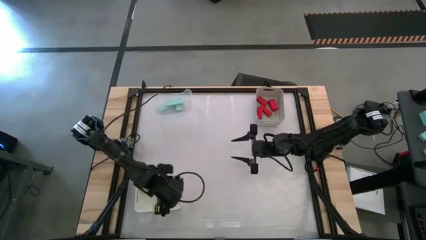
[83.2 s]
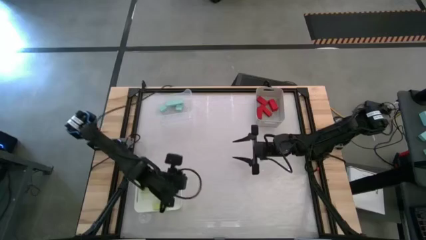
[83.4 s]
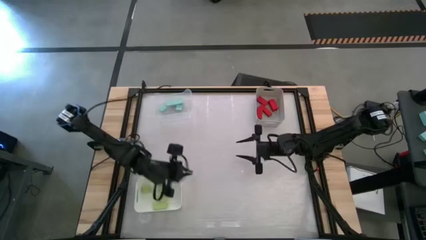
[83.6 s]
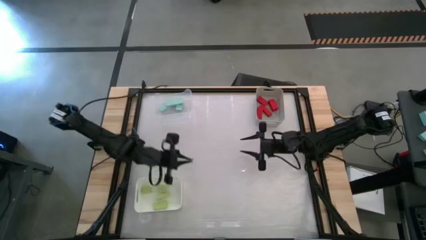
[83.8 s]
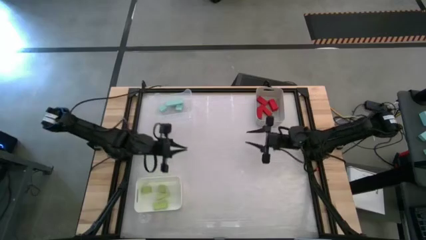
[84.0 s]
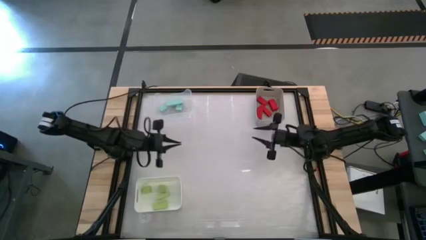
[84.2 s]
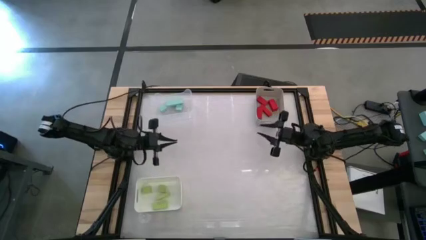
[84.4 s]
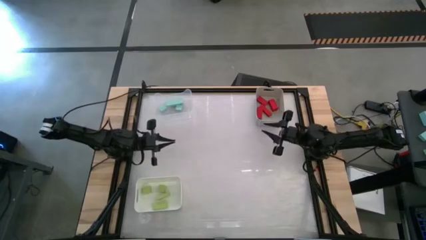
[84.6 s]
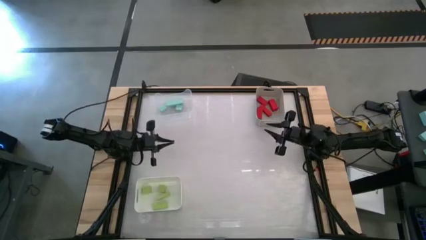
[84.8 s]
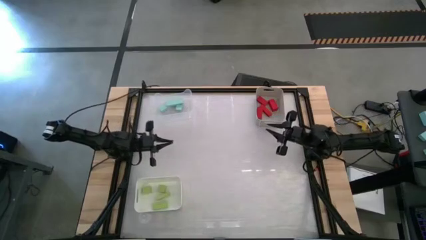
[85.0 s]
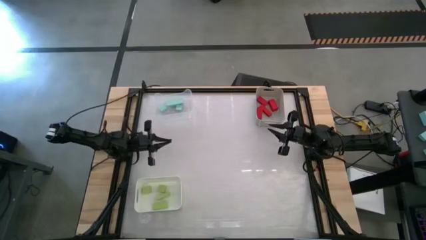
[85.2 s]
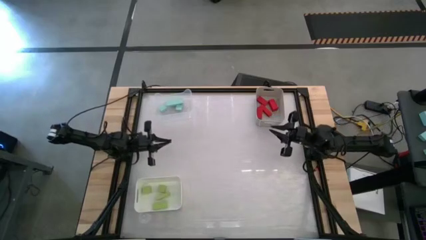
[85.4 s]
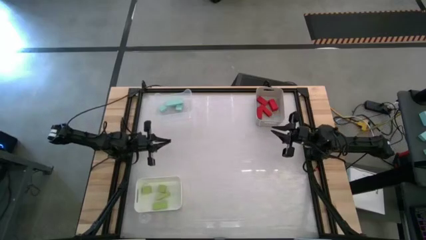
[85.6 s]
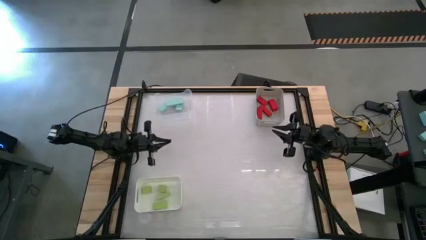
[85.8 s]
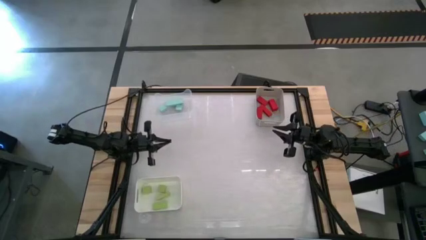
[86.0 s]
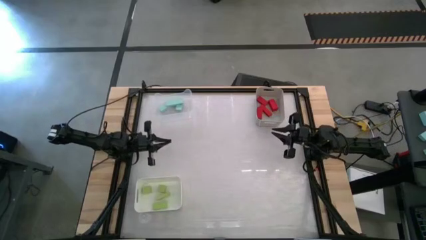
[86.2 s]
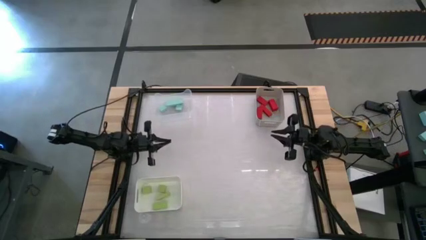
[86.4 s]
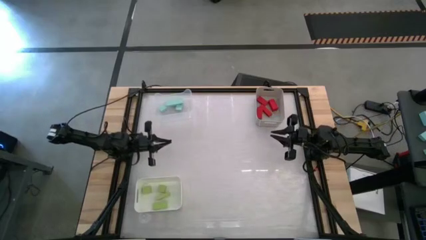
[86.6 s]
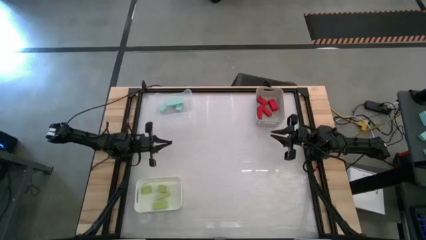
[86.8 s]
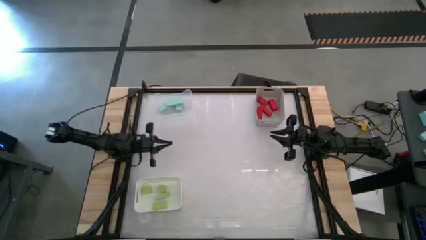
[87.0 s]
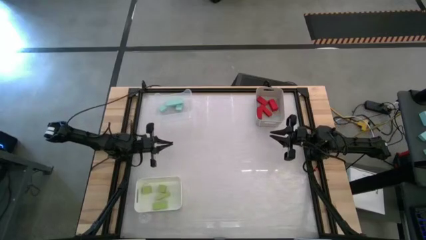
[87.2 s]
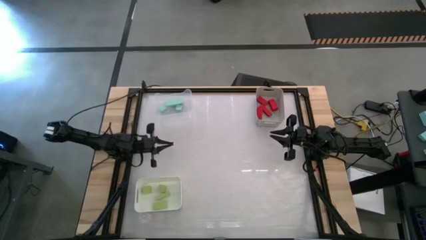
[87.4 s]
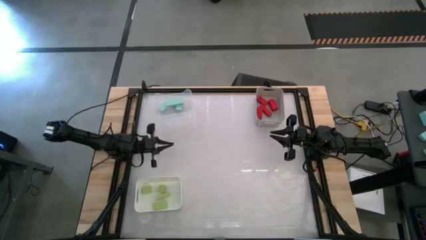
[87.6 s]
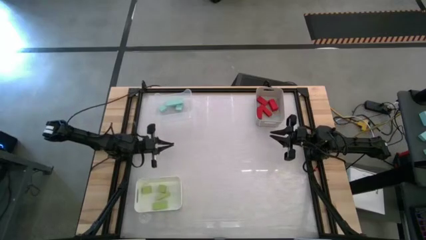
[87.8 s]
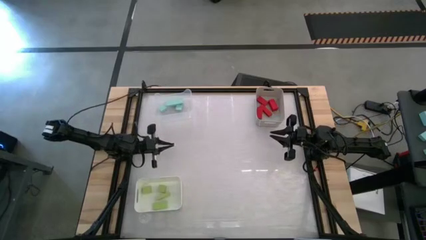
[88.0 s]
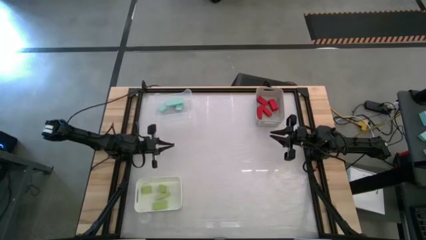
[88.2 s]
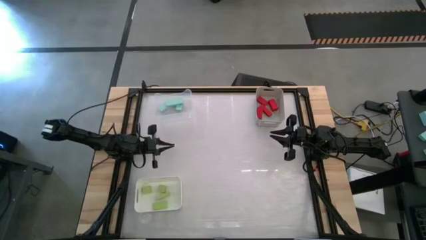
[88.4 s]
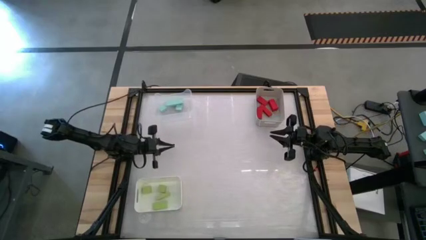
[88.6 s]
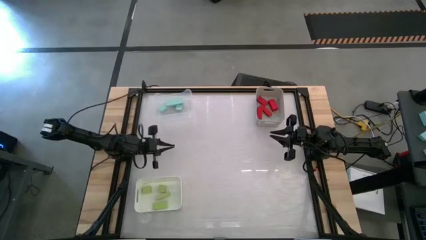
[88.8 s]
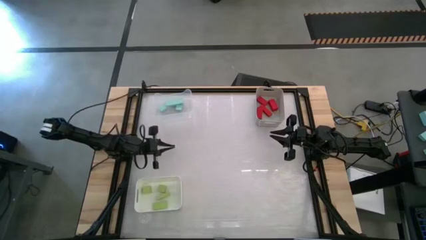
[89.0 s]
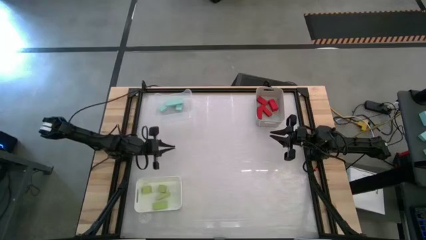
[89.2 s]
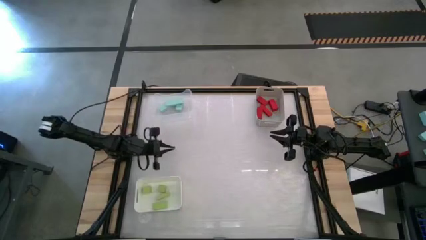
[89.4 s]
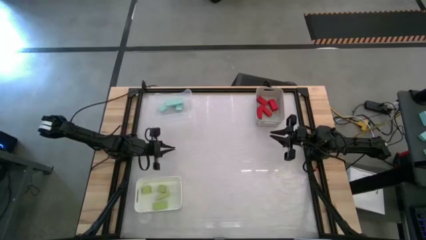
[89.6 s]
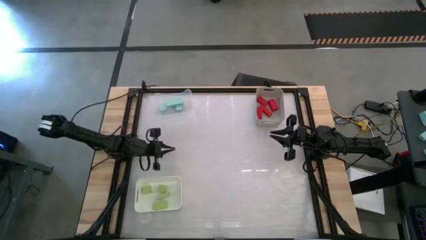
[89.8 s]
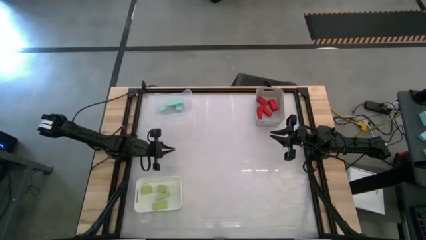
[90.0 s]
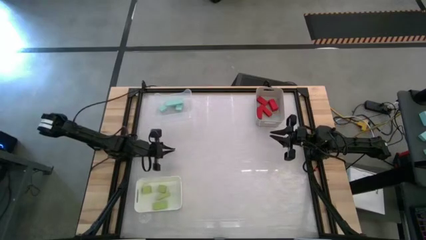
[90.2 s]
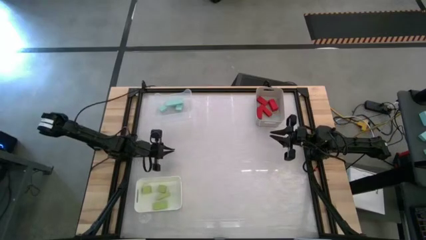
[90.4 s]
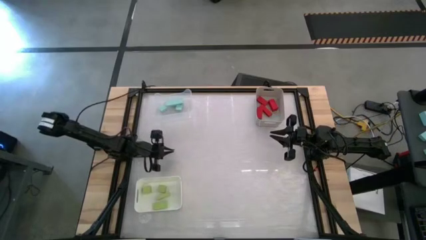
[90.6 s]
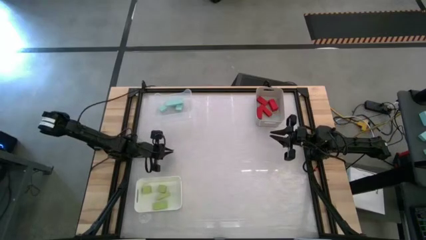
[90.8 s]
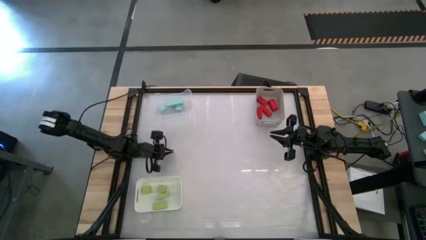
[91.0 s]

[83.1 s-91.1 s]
Task: Sort & place blocks by color
Return to Home Position

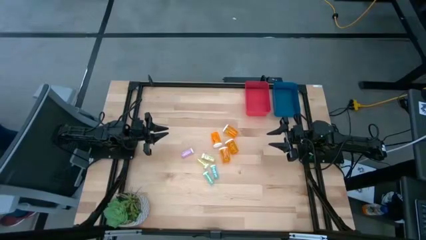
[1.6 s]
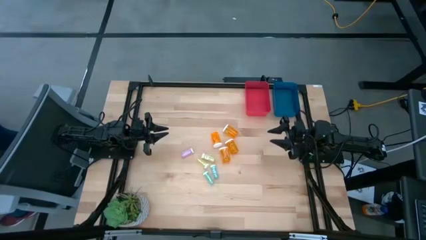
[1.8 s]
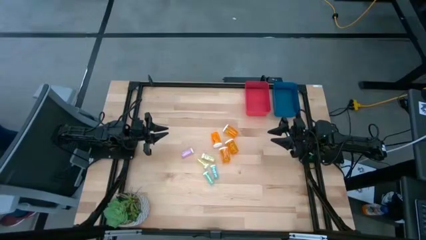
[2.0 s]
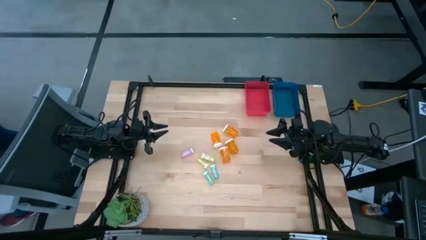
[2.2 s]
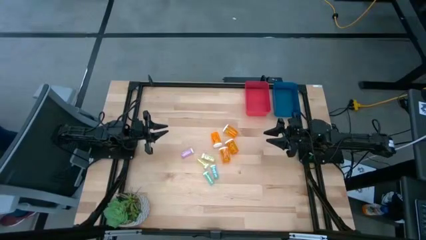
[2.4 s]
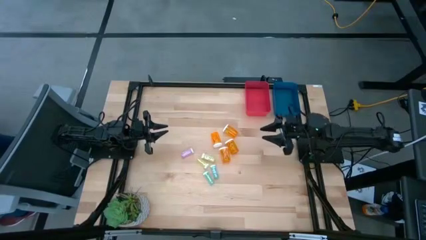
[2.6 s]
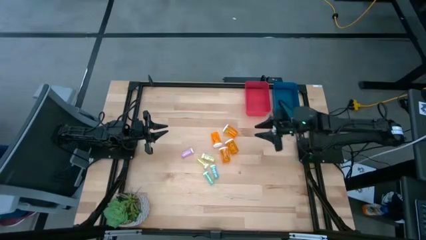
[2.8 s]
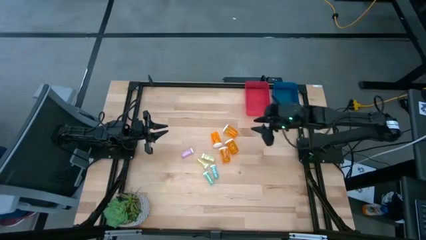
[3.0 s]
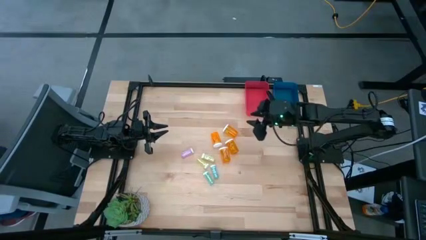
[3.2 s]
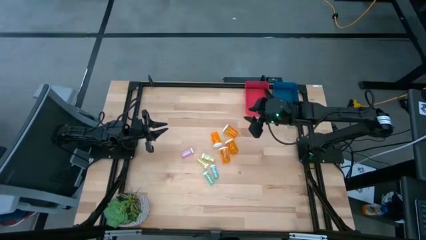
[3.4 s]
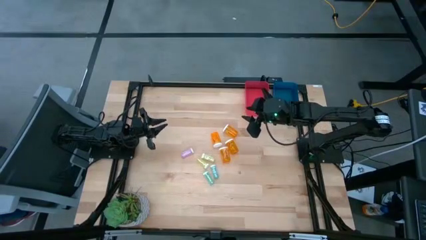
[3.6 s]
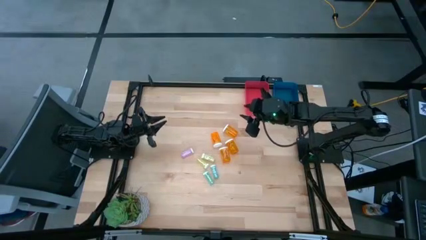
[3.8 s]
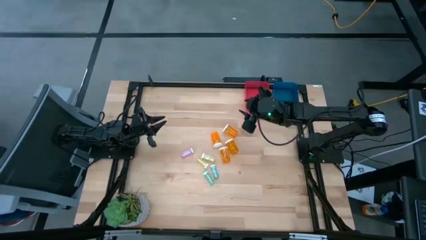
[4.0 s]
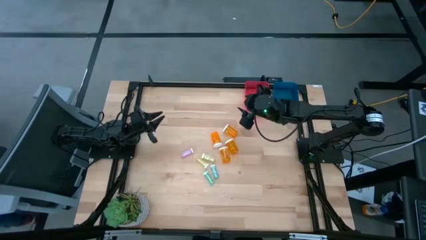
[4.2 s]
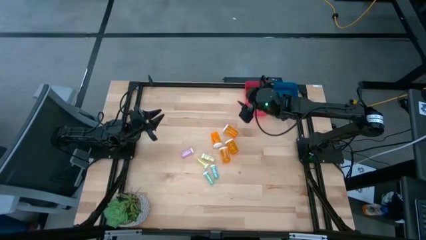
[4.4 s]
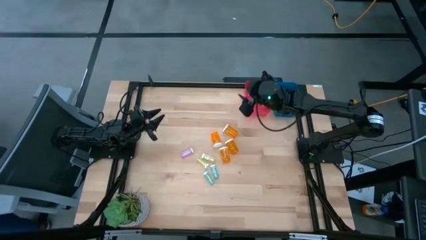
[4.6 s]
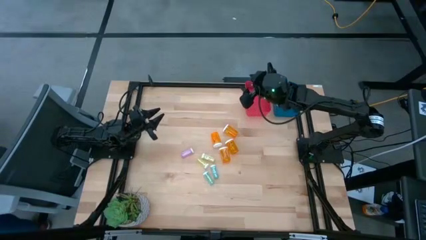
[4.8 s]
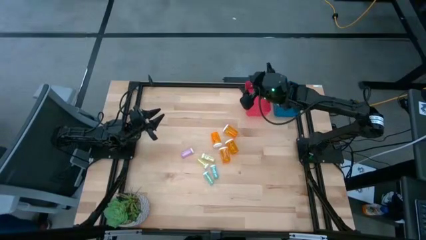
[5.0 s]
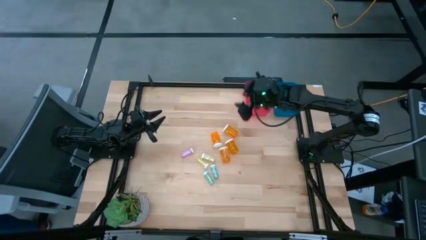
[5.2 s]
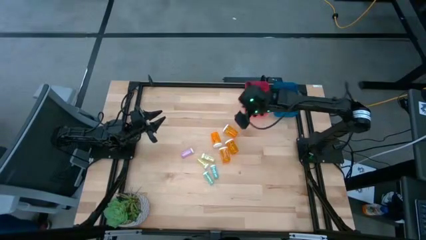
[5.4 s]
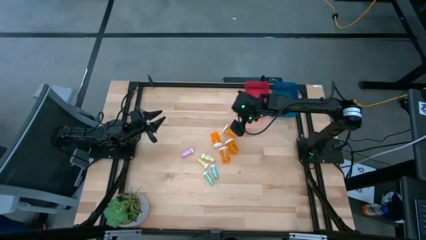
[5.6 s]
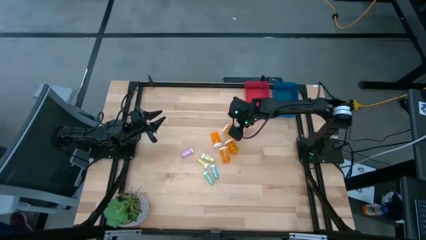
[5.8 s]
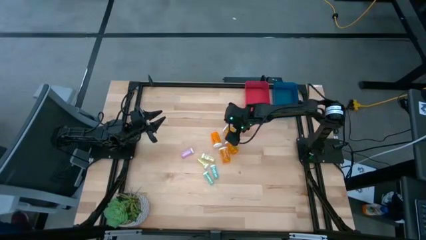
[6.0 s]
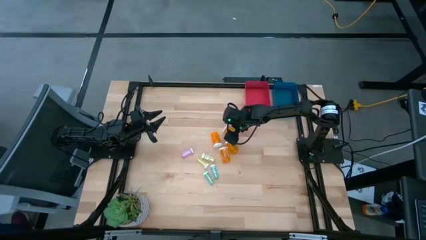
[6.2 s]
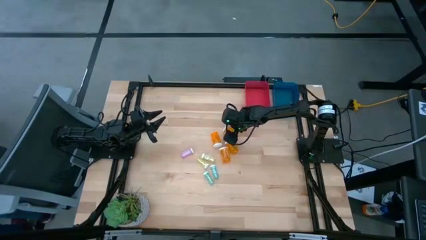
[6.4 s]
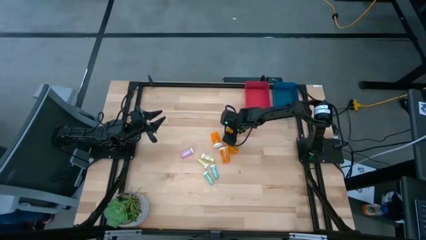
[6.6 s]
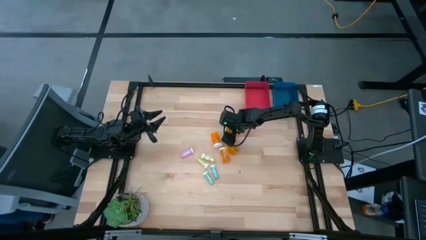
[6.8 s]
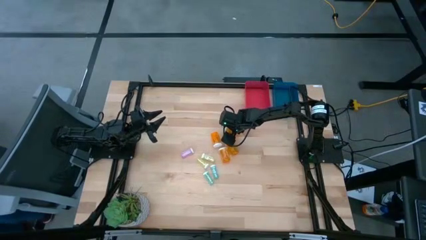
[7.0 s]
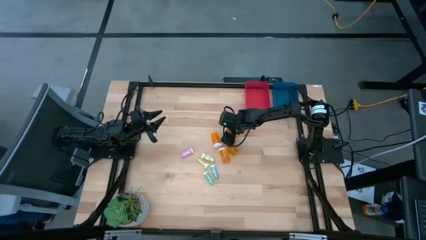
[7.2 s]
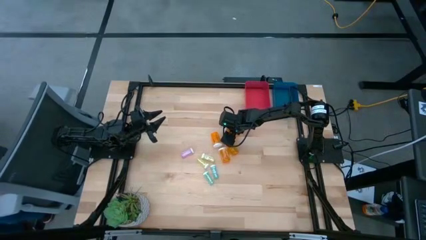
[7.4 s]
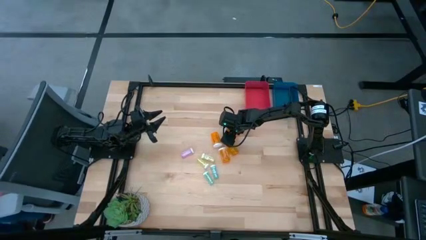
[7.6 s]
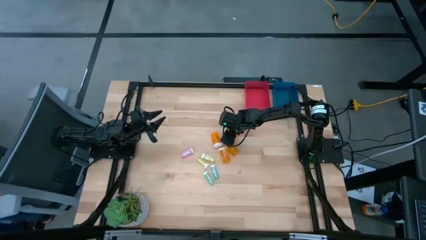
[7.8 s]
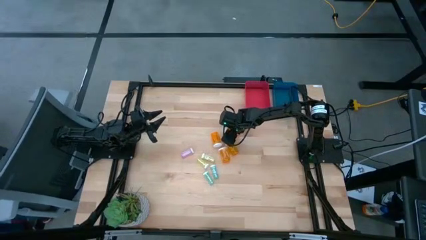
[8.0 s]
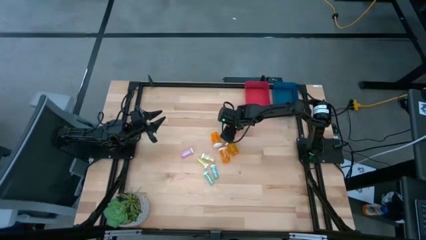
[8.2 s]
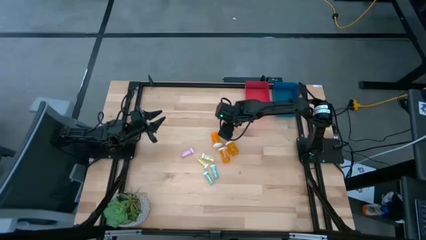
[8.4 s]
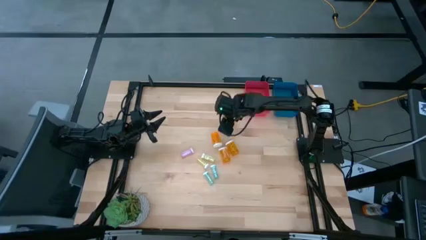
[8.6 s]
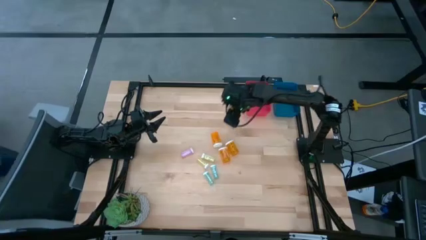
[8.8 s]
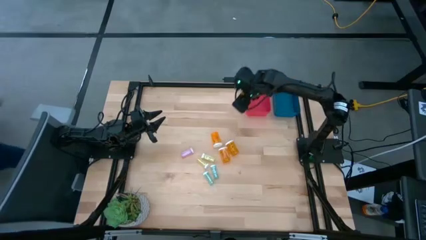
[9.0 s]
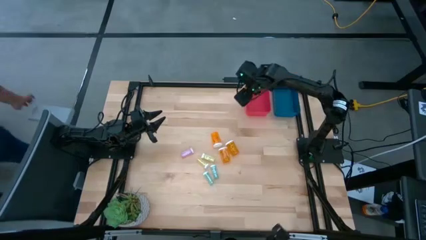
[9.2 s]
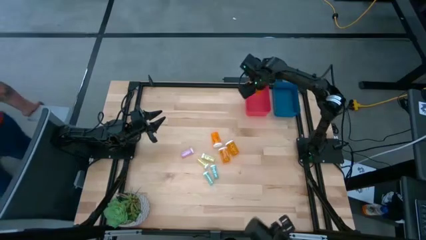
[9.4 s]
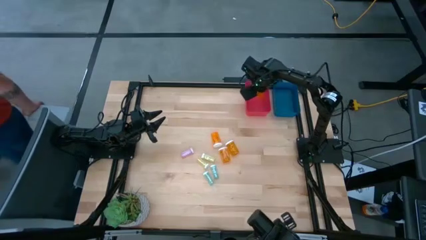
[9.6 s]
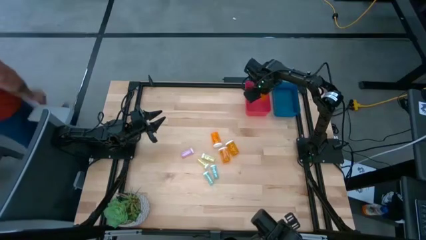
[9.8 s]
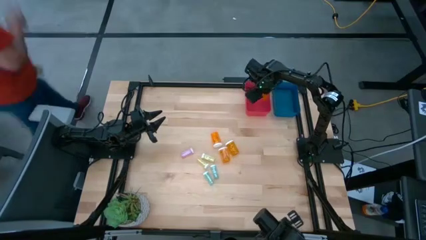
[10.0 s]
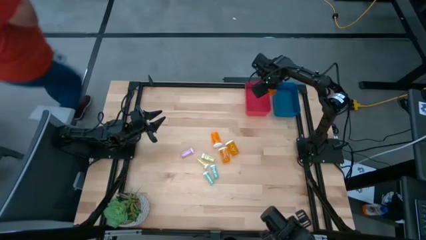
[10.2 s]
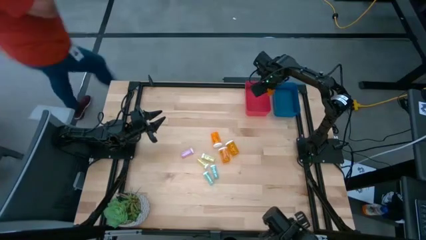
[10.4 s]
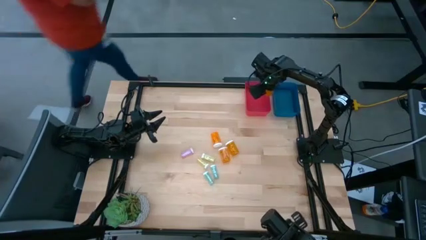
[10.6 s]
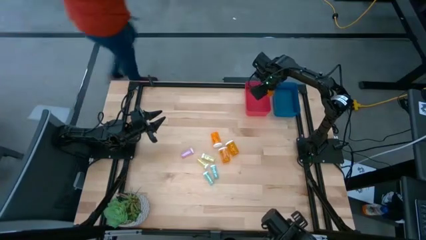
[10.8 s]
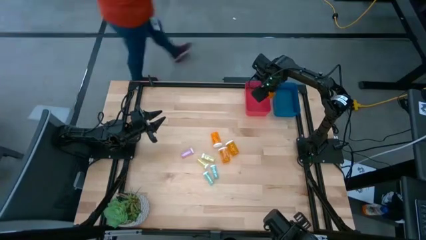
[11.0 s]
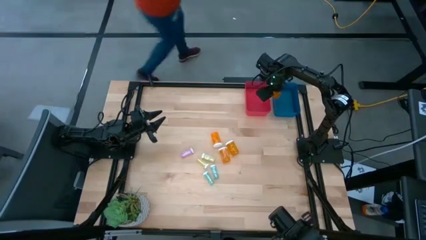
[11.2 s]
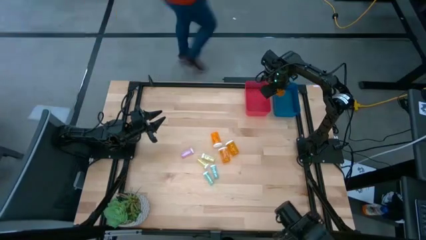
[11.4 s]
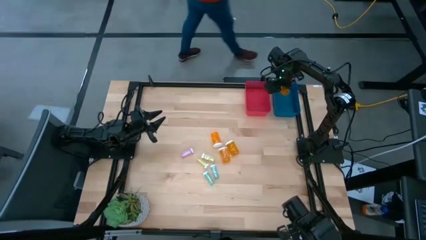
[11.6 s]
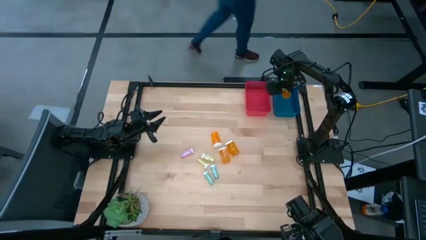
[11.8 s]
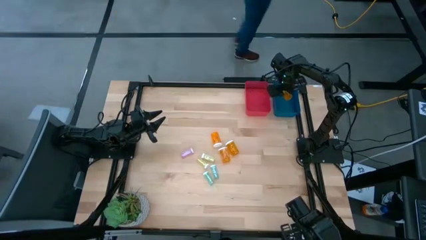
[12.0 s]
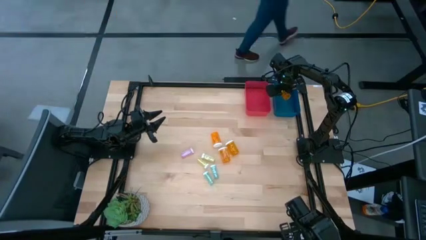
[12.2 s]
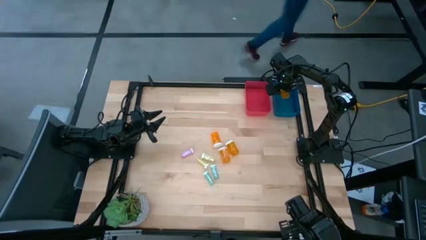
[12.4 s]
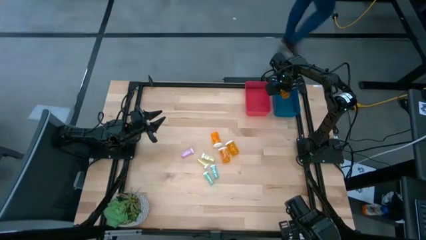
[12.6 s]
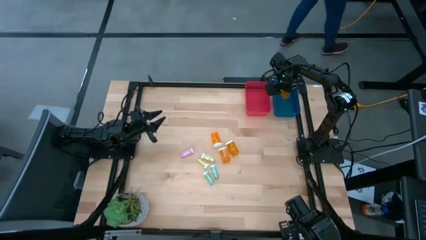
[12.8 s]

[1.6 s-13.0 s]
Task: Pick and place medicine bottles into bin by pill shape (circle, oval)
Put the orange capsule bottle into the blue bin
